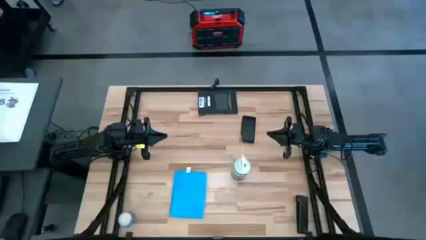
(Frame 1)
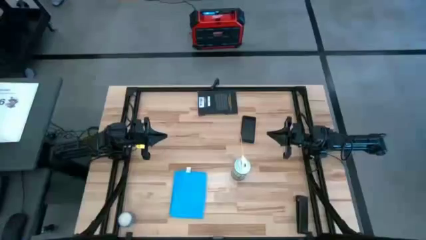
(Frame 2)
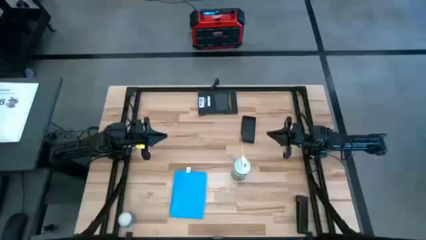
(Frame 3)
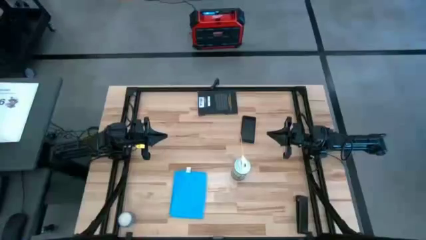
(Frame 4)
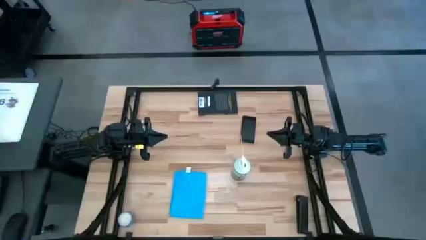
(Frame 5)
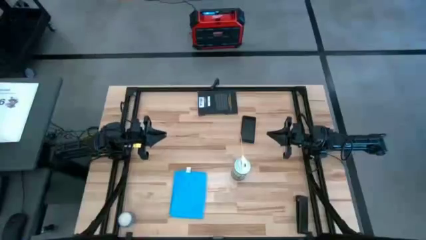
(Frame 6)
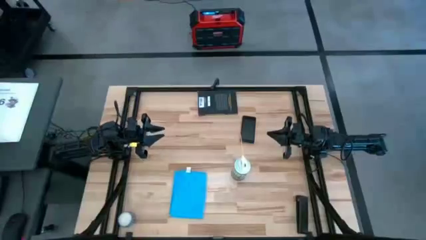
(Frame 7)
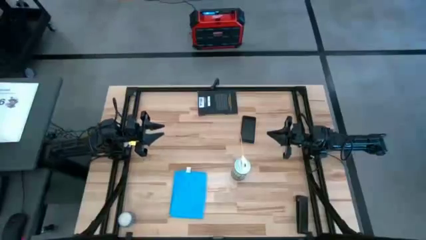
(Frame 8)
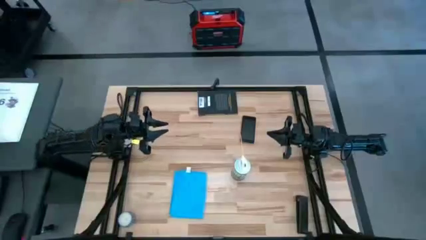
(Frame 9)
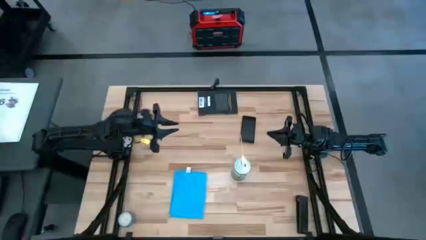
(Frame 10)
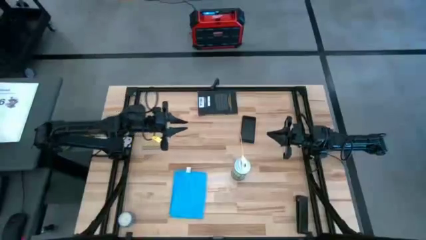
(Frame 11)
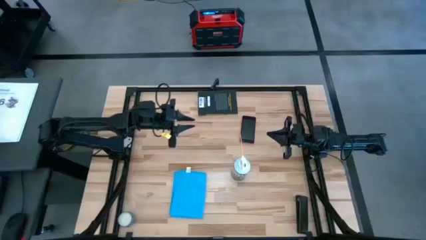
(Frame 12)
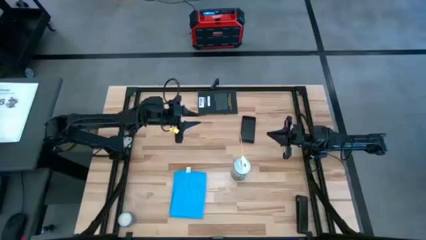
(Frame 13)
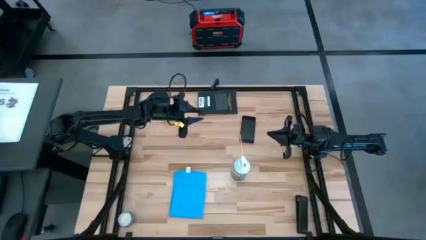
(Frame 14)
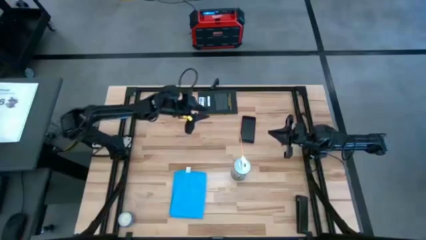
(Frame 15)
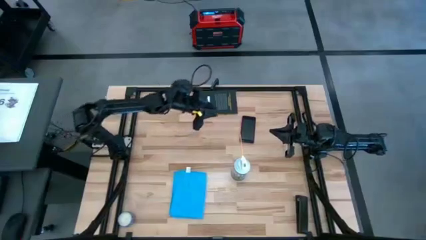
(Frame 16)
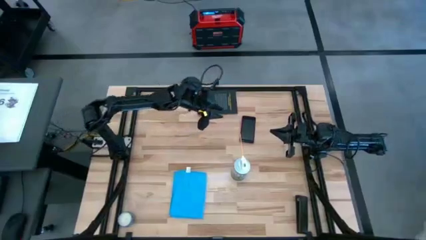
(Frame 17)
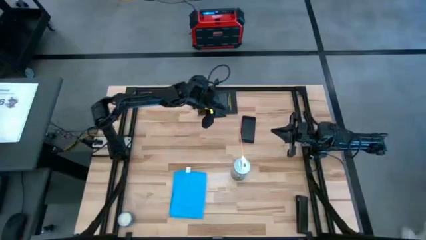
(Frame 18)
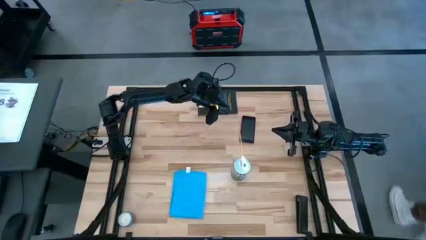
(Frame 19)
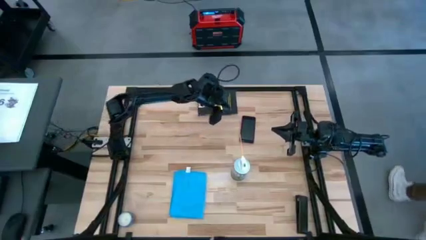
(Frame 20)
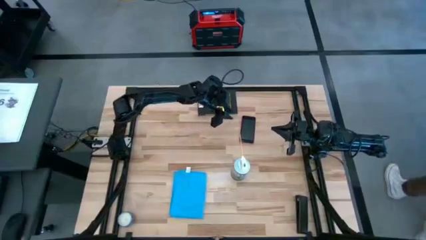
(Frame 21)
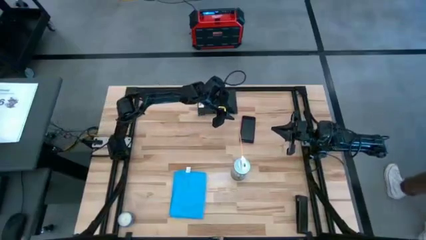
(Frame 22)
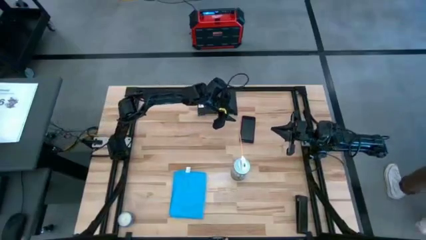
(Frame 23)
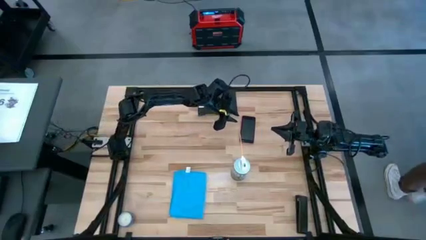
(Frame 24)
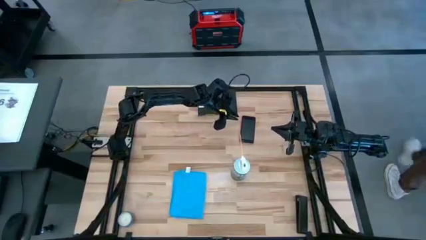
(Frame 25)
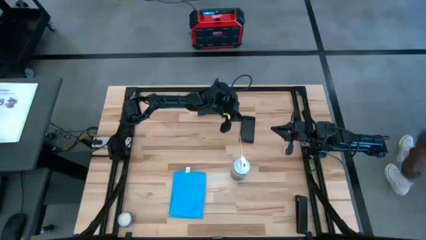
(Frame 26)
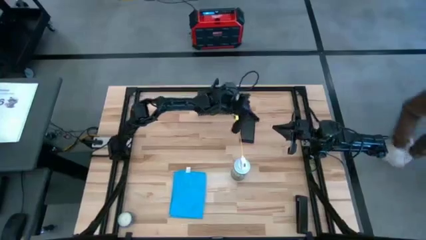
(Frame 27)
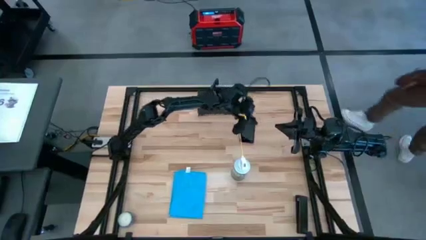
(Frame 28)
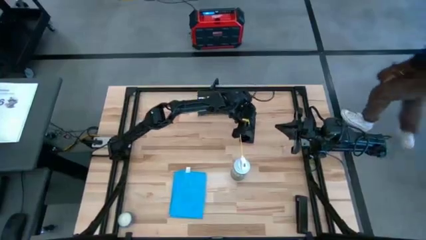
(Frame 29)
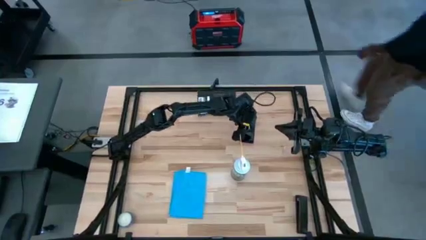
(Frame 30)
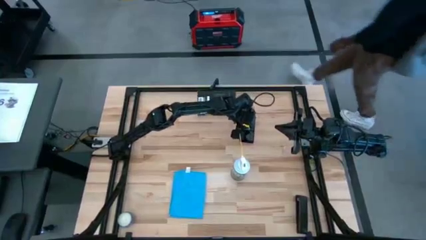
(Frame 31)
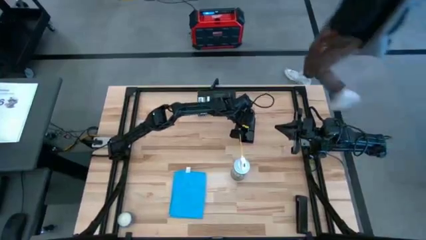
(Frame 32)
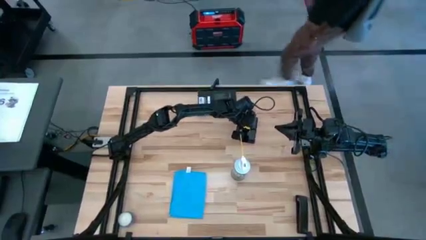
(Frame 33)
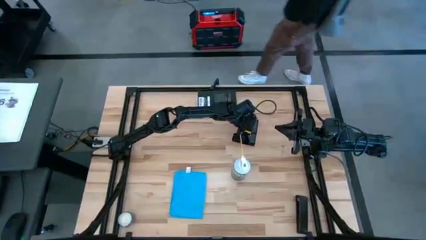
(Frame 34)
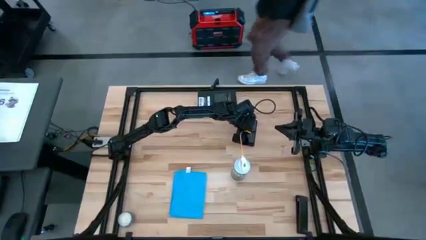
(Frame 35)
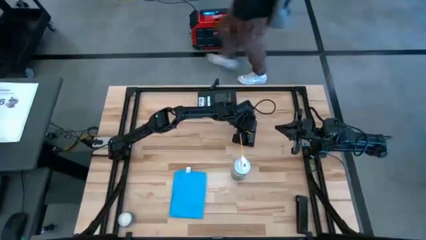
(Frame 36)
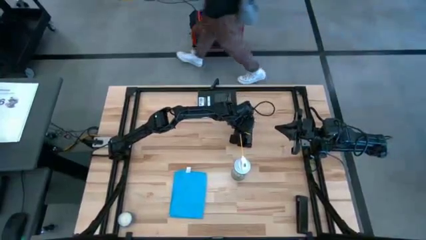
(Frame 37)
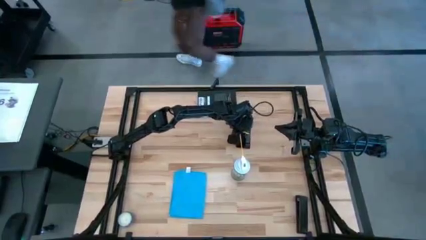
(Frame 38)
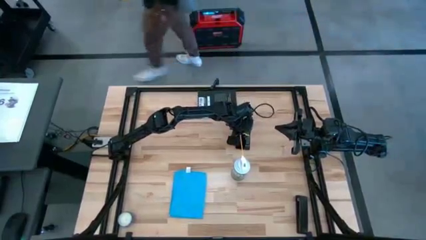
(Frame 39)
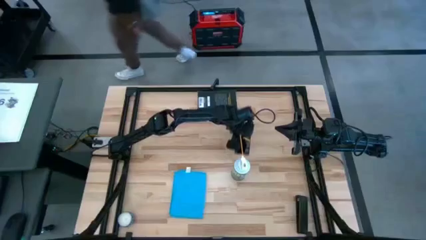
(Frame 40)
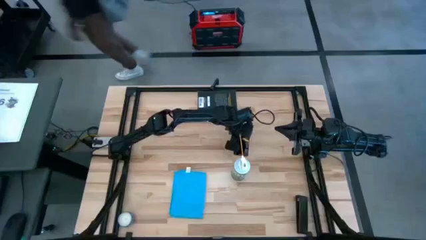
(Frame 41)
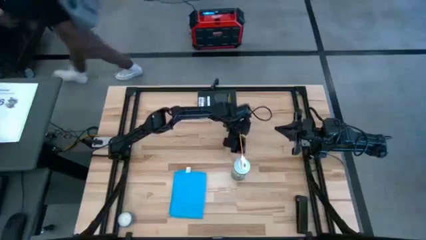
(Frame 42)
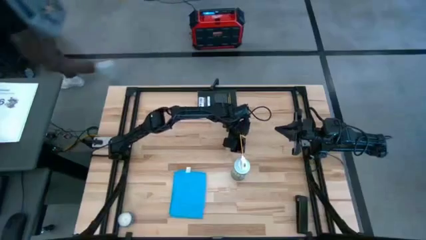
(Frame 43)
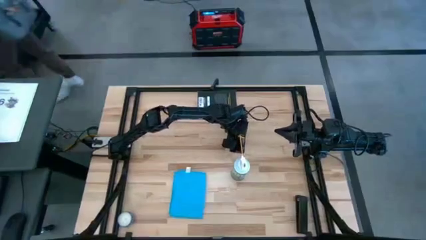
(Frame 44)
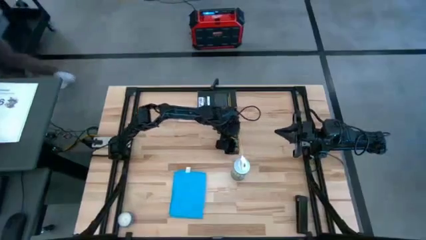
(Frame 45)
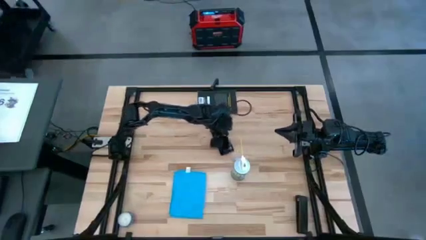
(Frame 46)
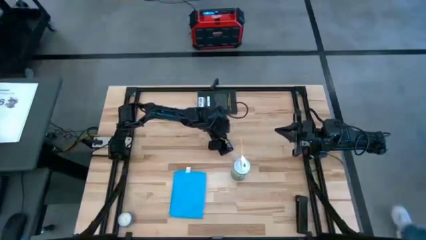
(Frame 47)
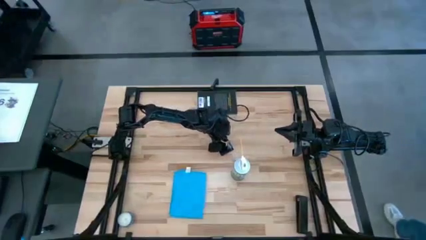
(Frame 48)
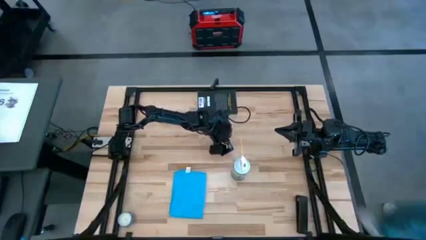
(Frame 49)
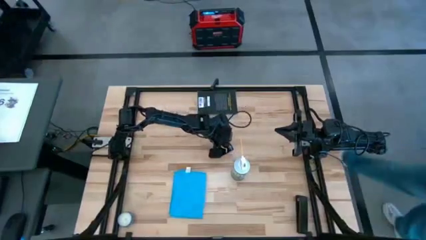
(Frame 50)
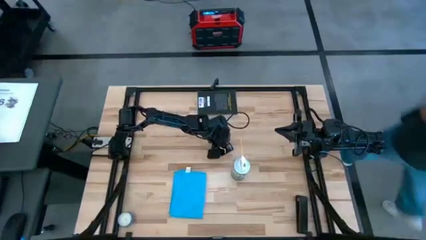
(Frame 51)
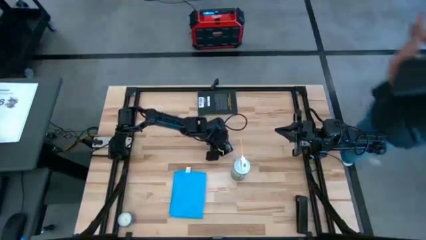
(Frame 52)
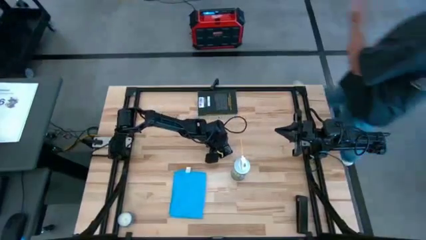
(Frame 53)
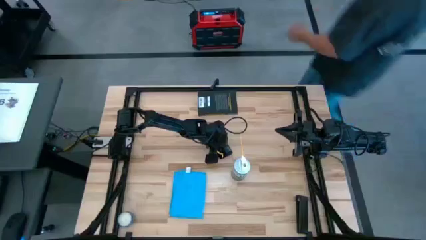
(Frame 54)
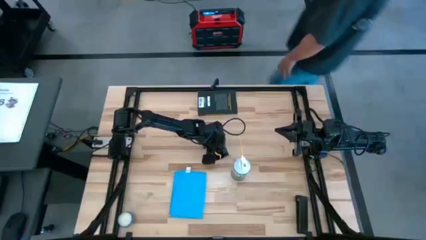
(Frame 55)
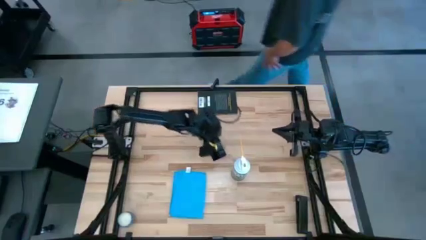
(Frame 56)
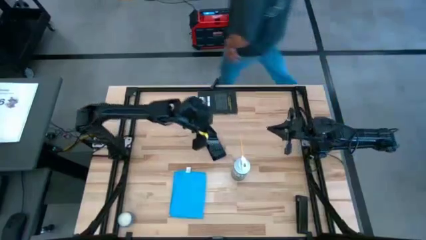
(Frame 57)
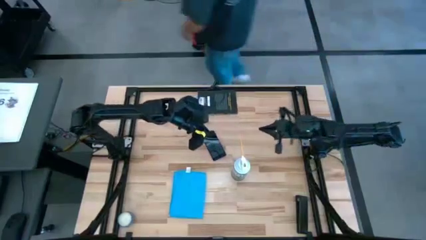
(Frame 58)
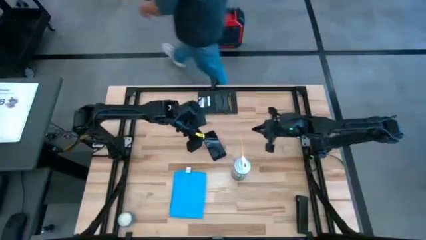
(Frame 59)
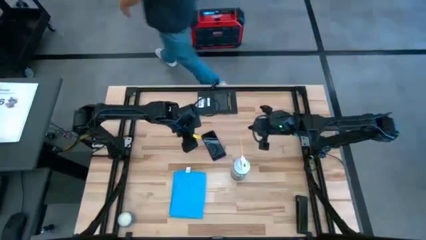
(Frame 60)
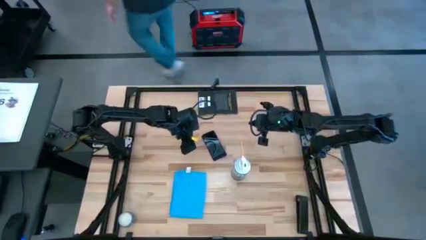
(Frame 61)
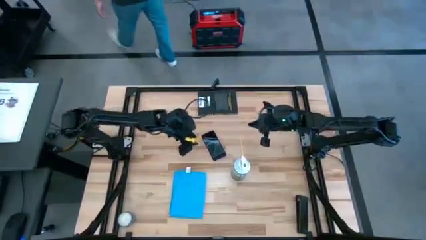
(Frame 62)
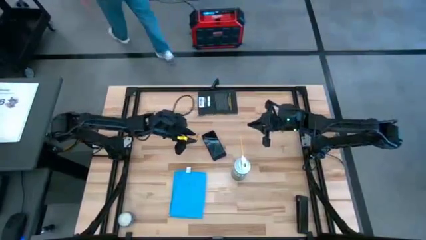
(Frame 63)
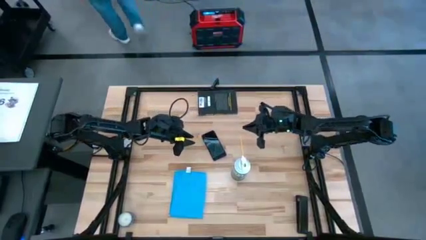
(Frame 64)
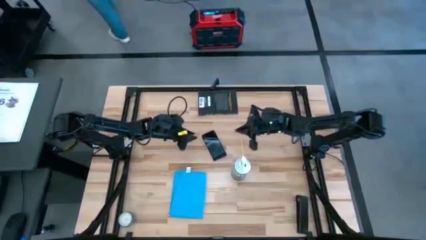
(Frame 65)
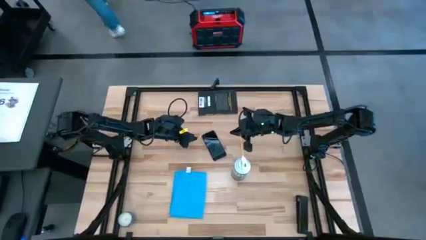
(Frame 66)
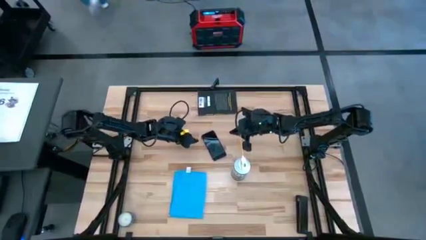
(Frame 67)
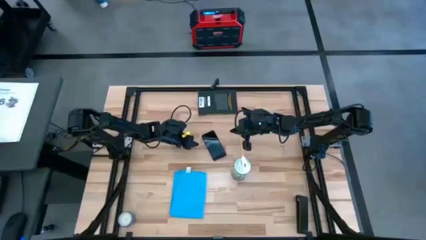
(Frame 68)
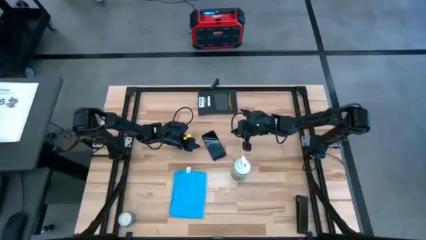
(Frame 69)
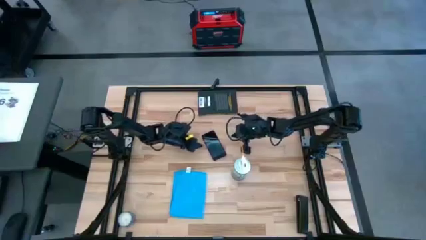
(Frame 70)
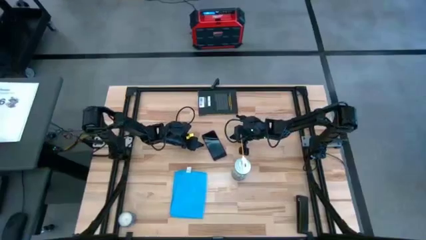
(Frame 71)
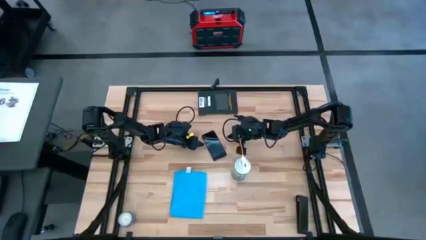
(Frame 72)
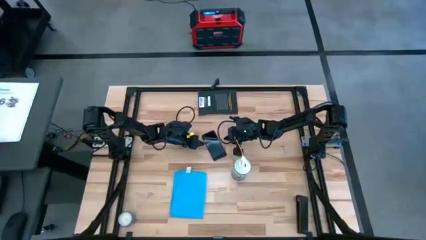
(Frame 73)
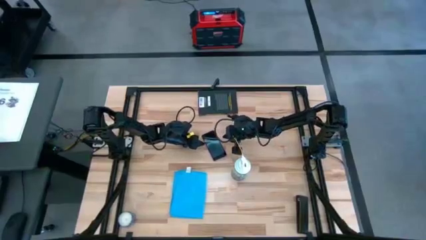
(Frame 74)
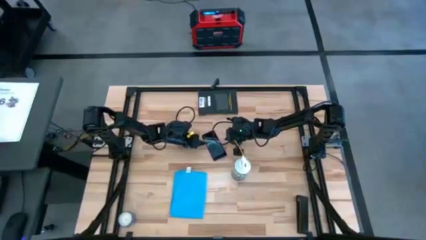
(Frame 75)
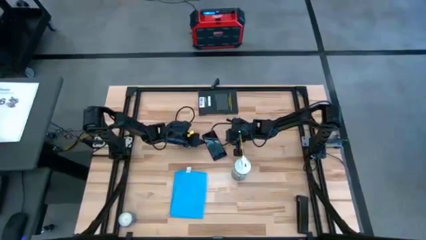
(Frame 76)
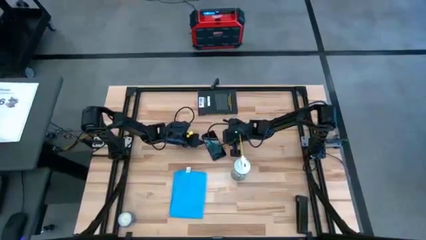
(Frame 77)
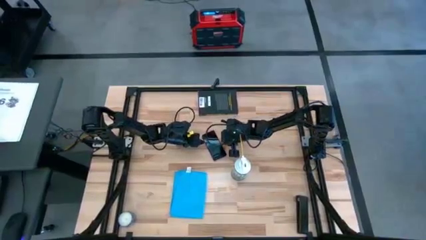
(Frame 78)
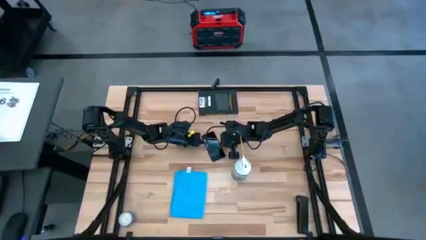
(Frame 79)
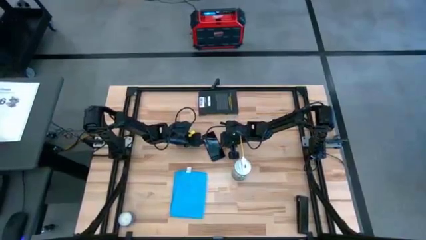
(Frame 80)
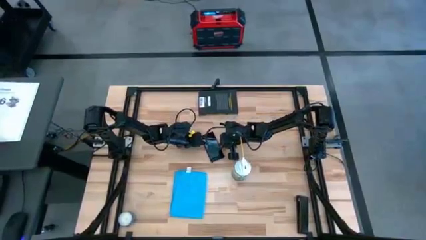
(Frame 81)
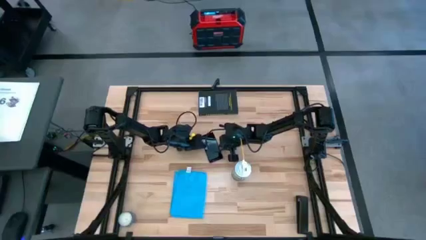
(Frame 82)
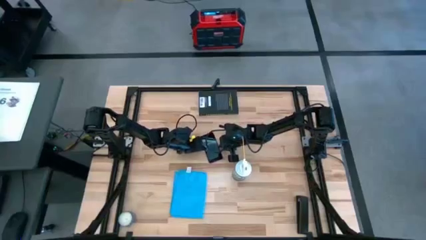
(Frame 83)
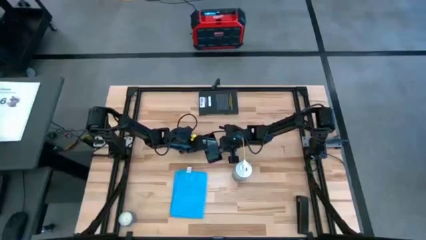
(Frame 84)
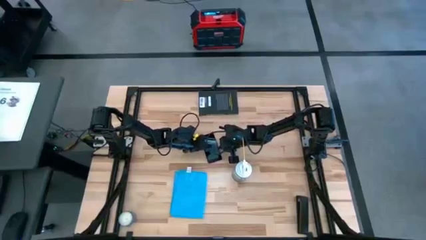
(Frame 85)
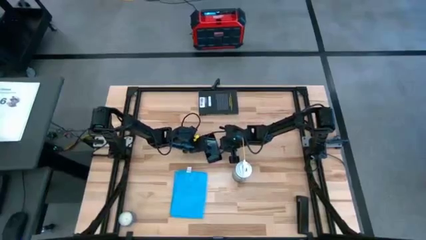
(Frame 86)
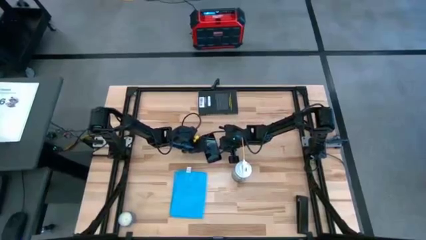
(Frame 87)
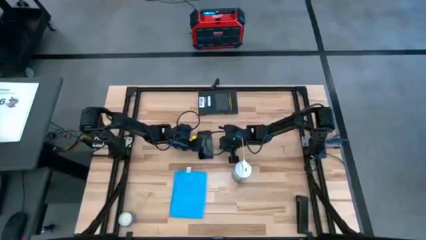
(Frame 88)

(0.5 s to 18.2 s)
Task: Apply microfiber cloth
Spray the front of the cellphone with the spray bottle
